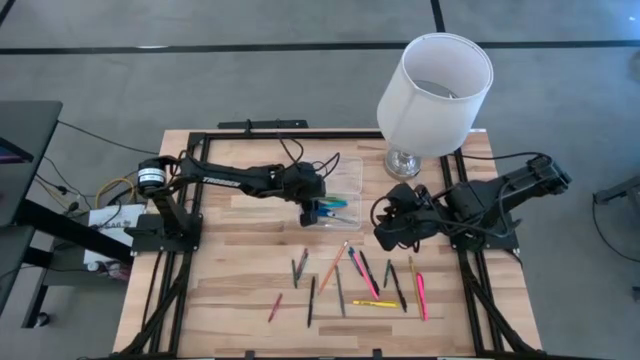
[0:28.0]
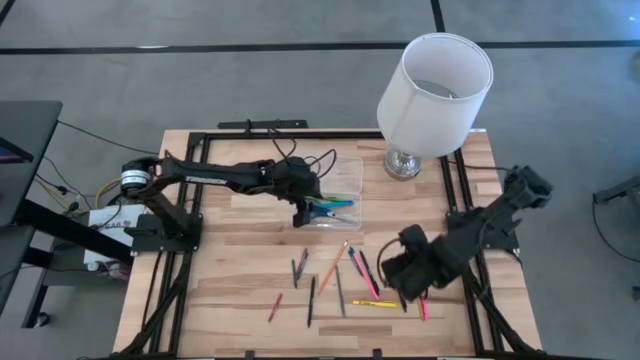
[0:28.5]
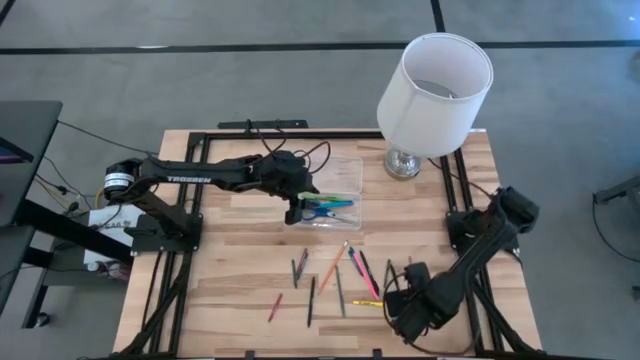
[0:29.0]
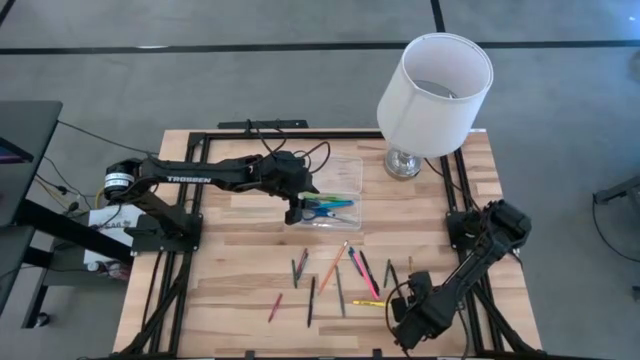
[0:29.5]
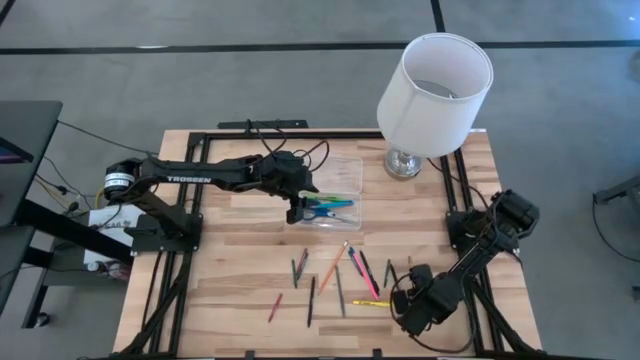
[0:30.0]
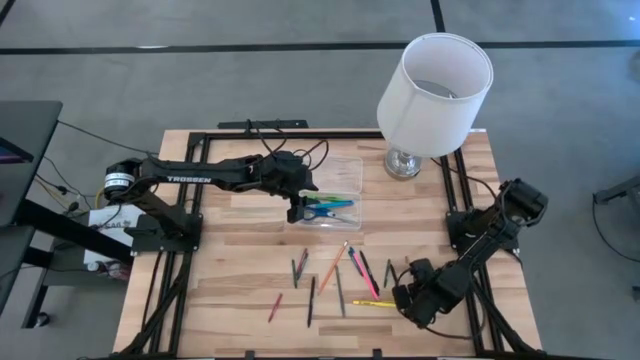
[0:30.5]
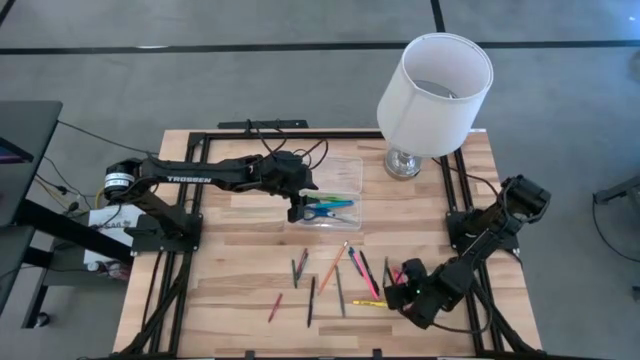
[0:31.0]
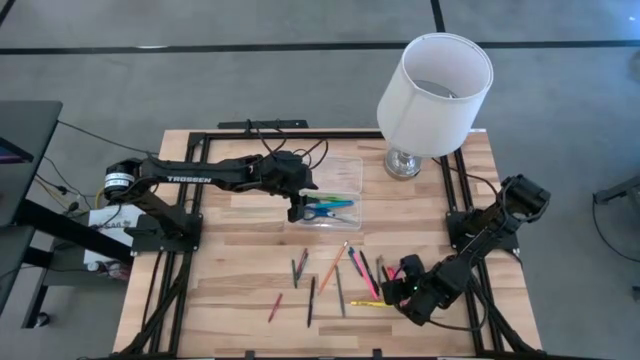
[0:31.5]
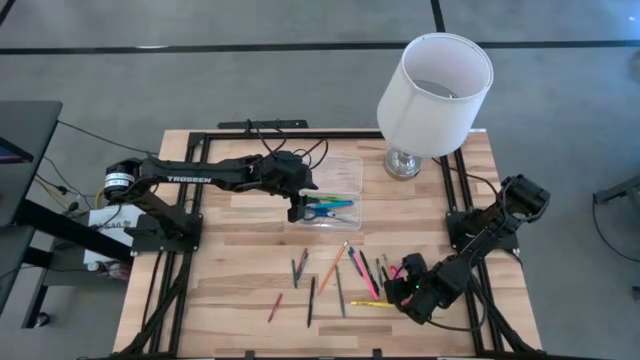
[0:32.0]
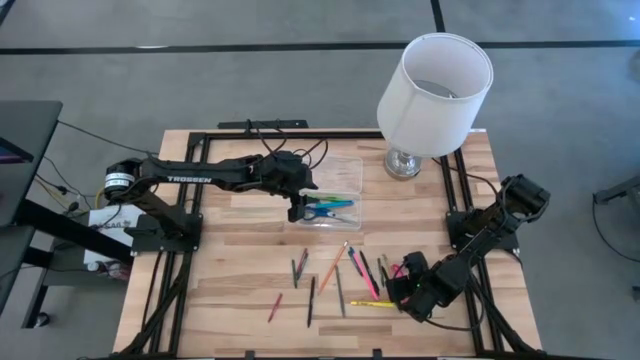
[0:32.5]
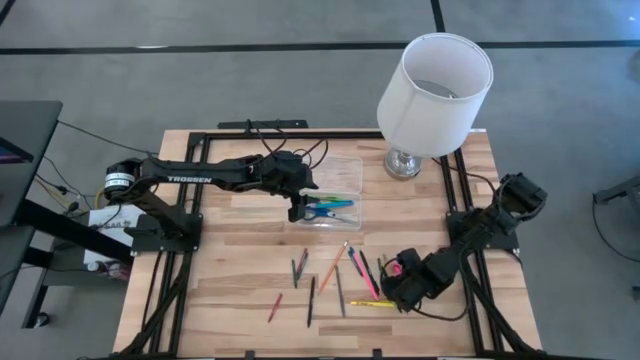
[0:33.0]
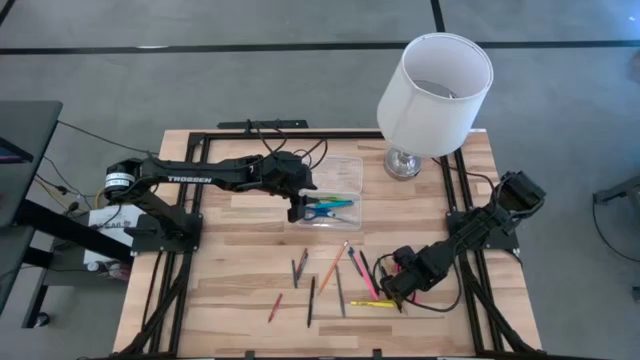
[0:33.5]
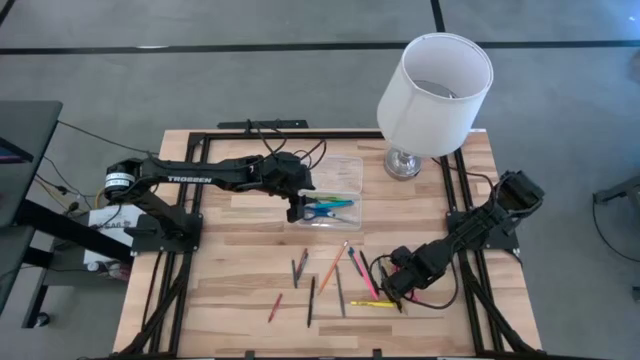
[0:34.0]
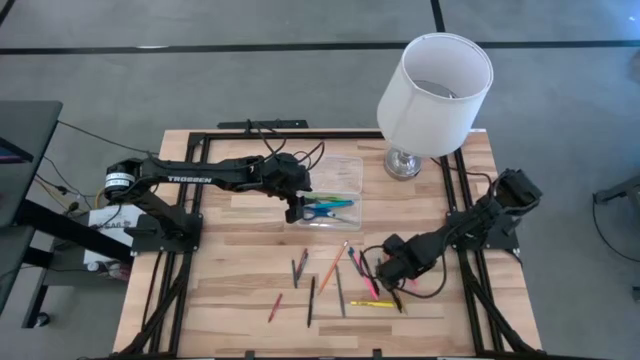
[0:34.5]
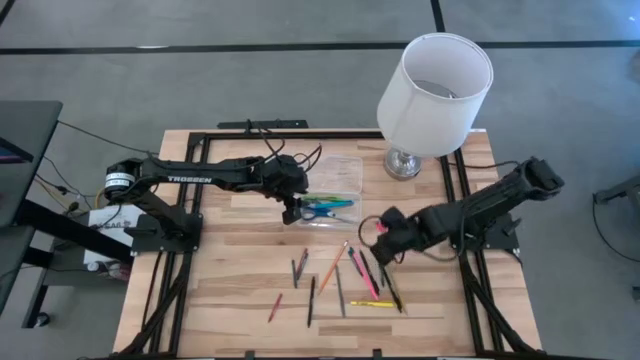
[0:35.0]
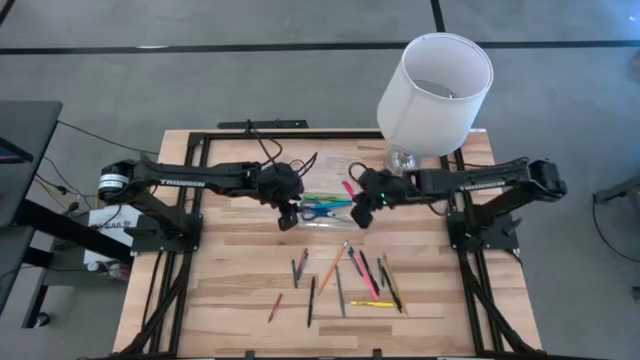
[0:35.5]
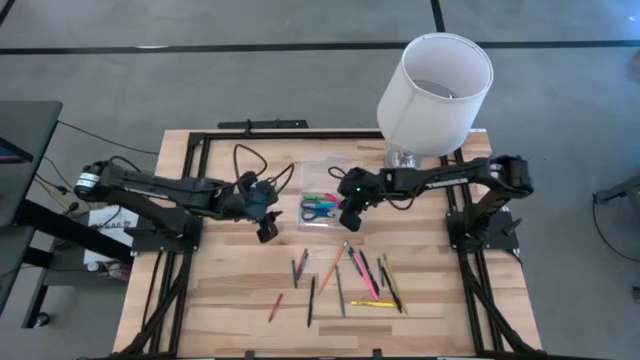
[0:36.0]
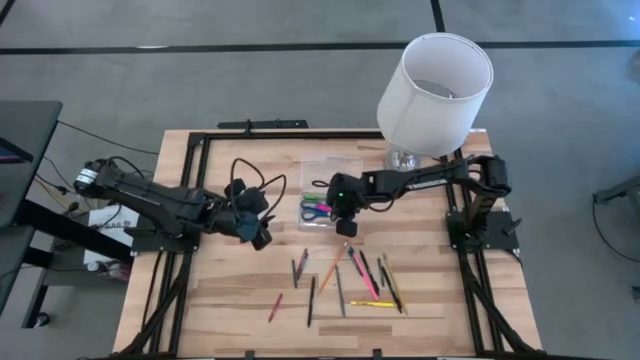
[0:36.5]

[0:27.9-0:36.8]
Task: Pick & place school supplies into a supply box
Put the pink pen into the transparent supply box

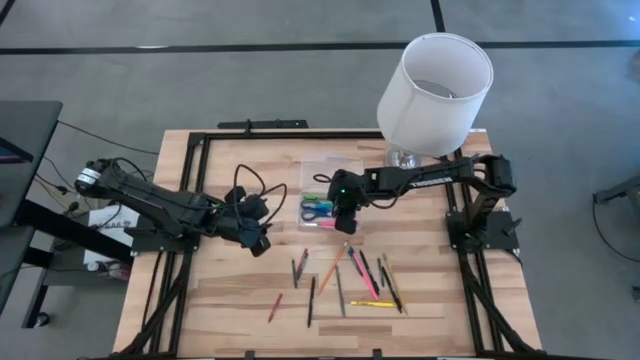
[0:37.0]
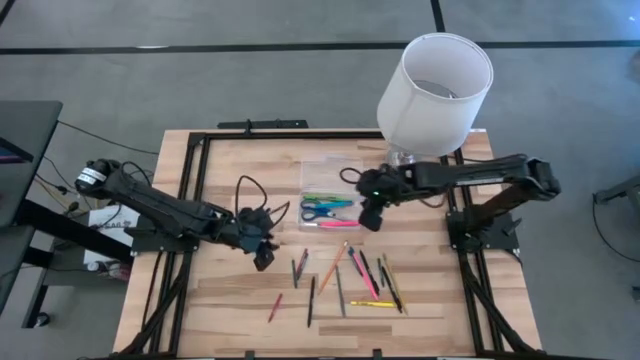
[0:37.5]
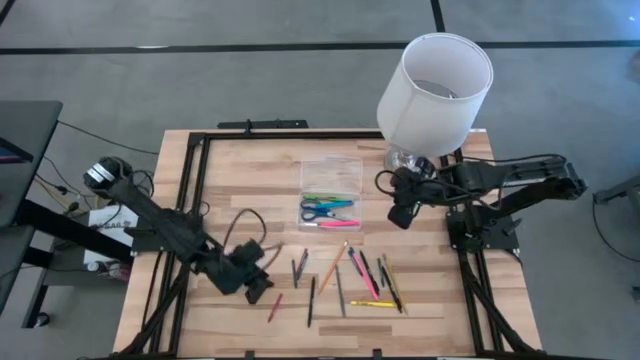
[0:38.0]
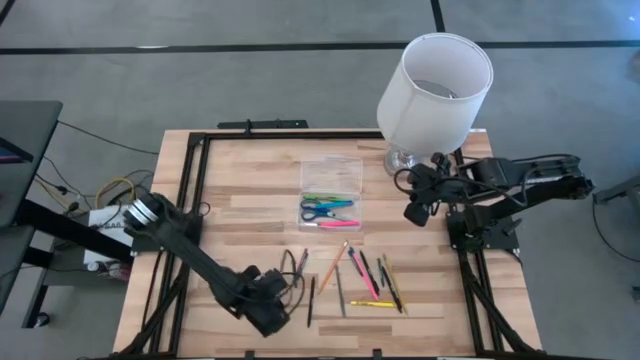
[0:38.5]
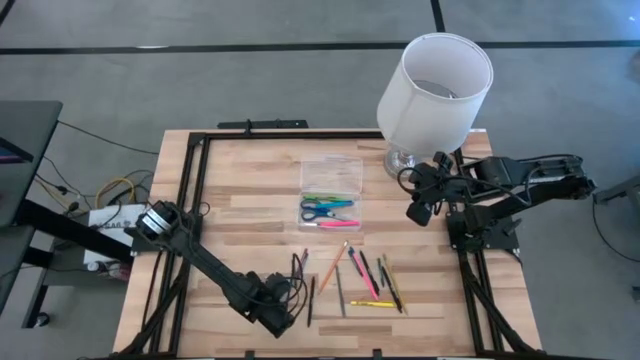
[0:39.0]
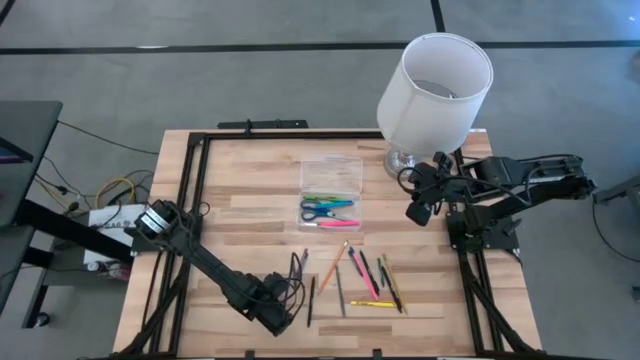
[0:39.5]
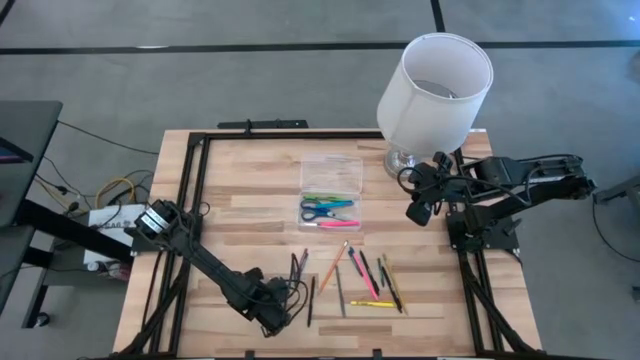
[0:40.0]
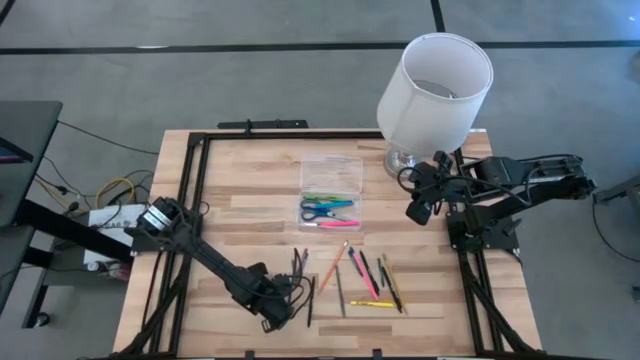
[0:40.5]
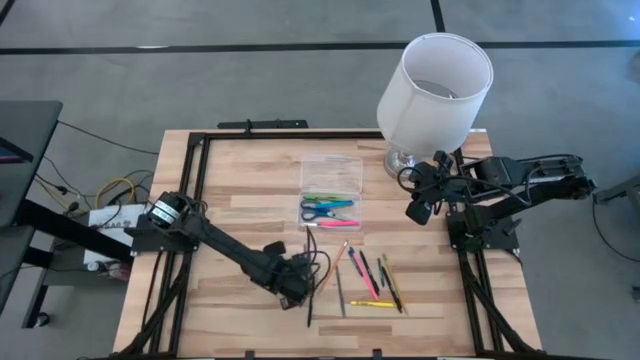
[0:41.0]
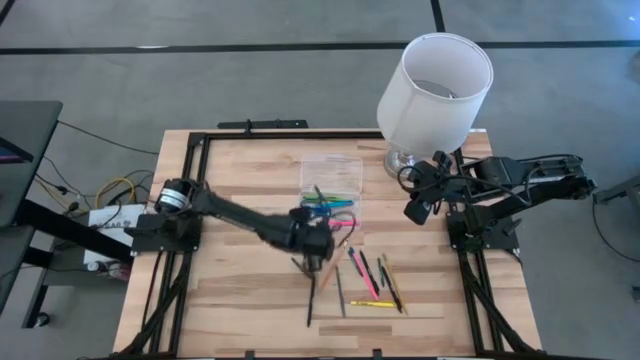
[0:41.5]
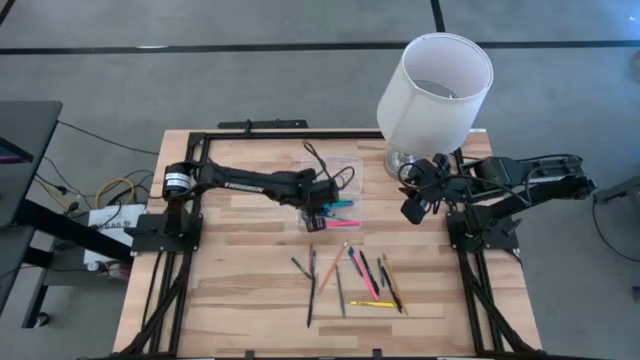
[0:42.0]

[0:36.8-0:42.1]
Put the red crayon into the transparent supply box

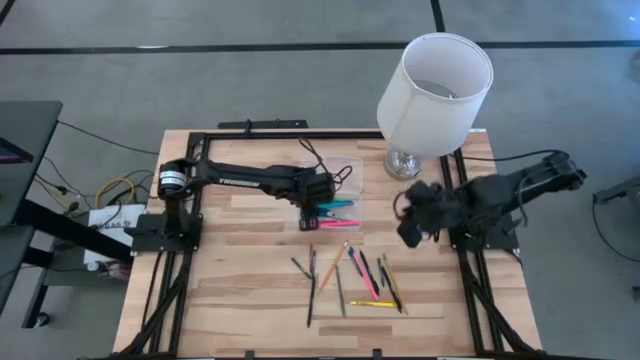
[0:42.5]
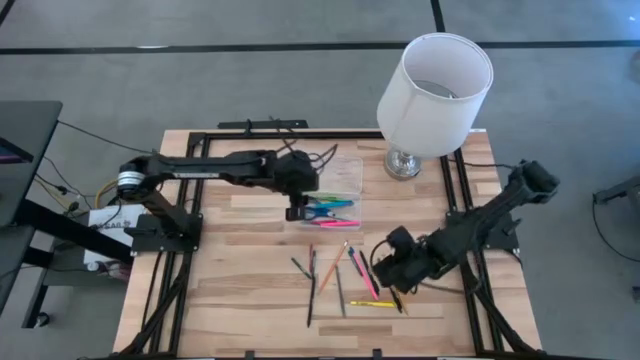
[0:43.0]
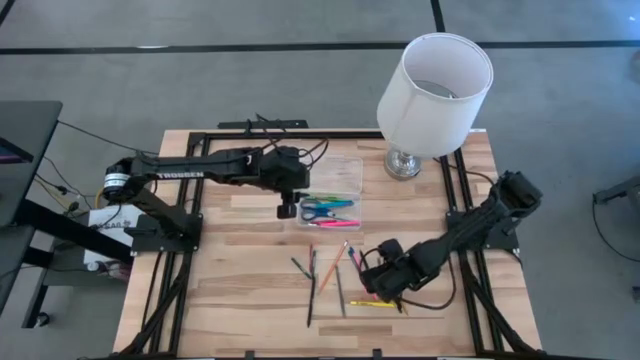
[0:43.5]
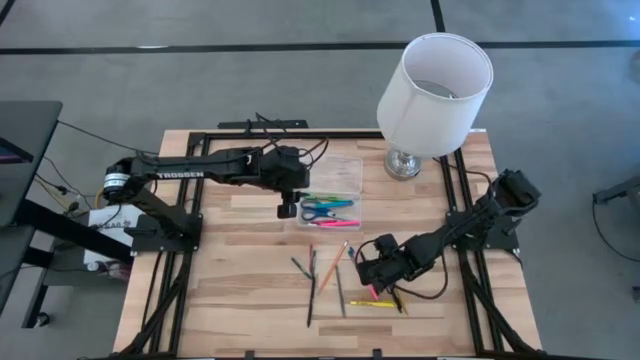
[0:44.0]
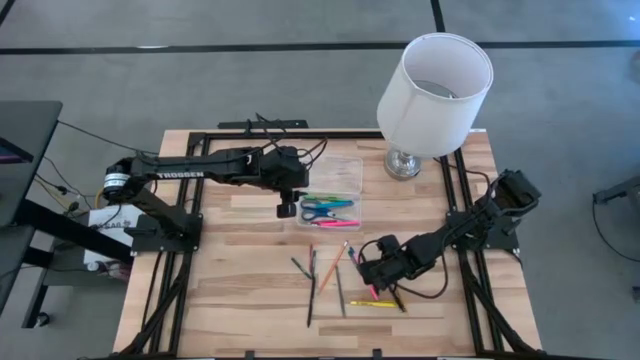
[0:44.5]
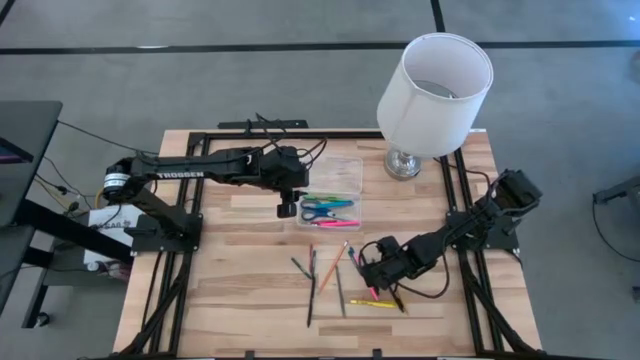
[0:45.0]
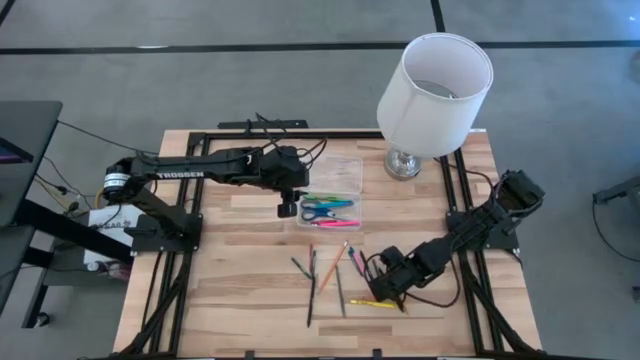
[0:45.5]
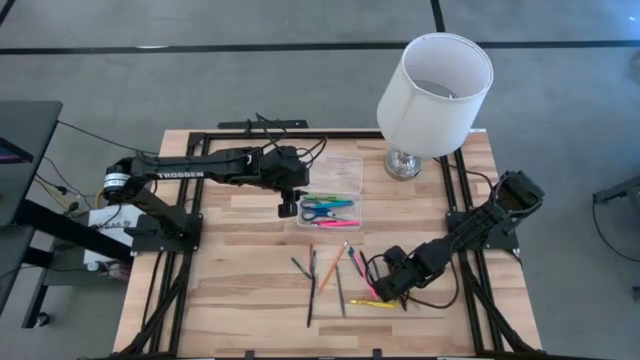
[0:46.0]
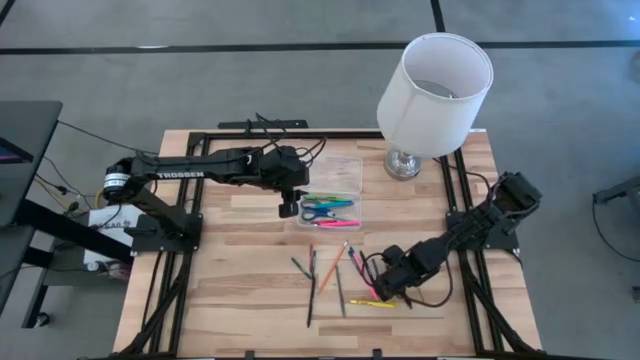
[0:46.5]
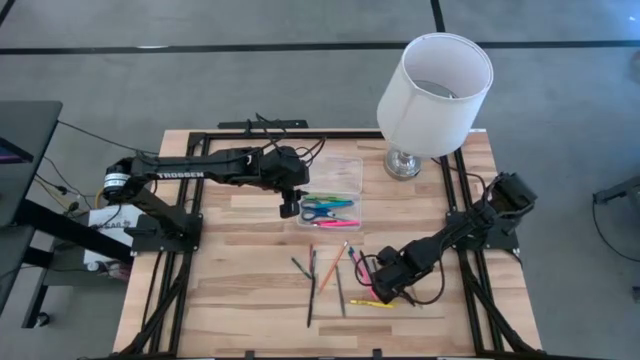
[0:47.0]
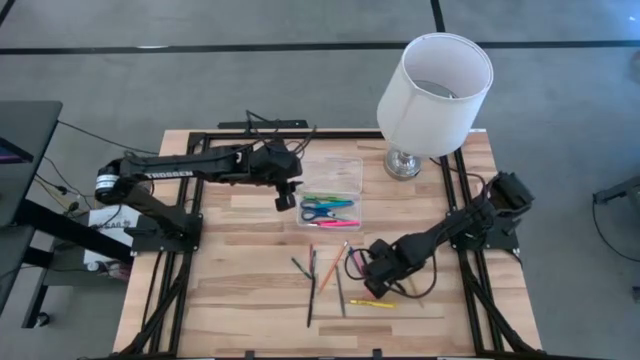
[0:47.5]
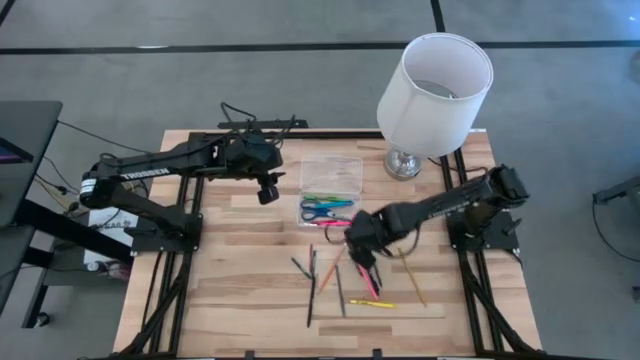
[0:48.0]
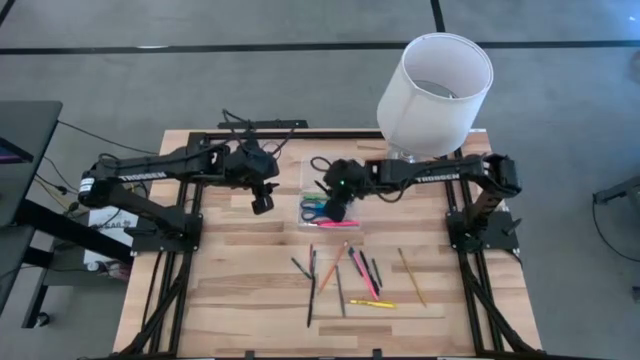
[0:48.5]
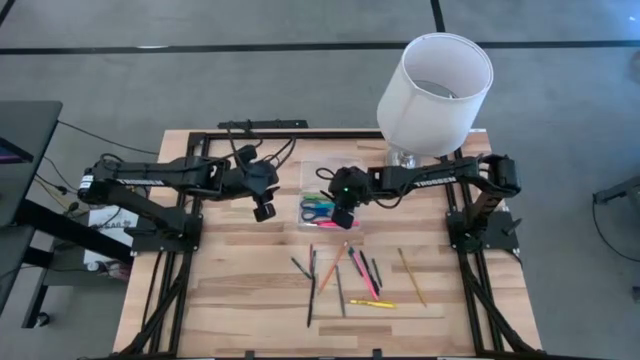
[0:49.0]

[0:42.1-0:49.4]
Put the black ballpen into the transparent supply box
